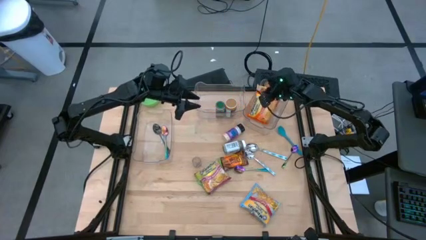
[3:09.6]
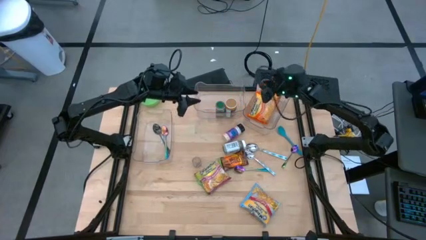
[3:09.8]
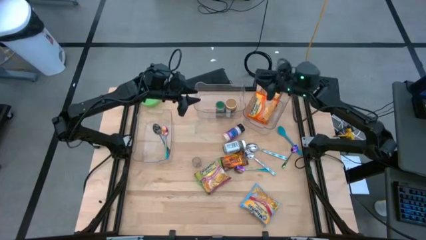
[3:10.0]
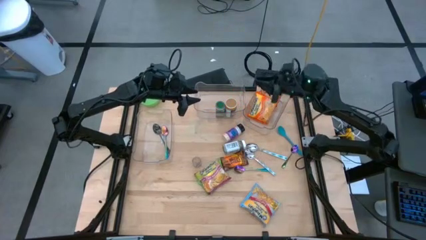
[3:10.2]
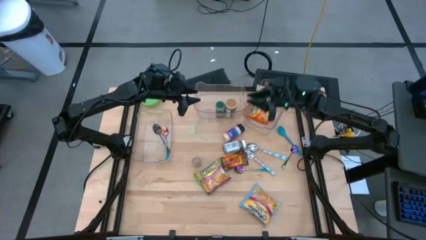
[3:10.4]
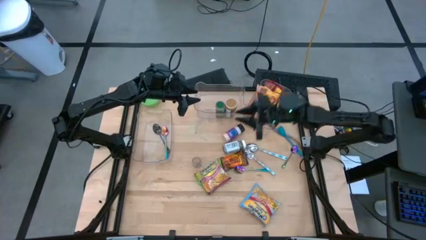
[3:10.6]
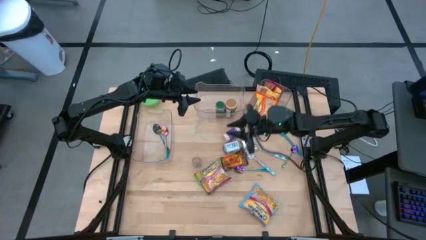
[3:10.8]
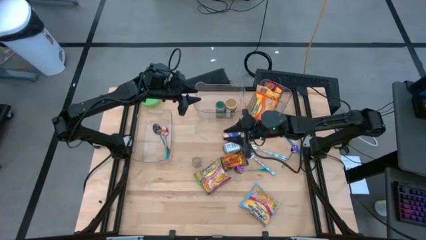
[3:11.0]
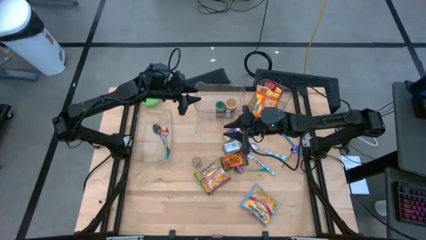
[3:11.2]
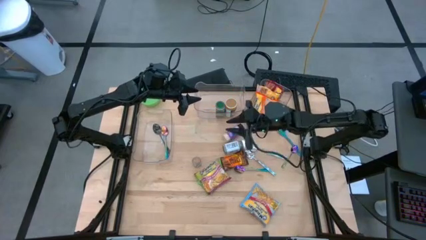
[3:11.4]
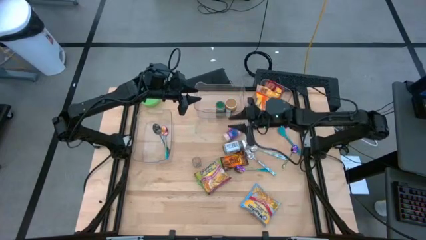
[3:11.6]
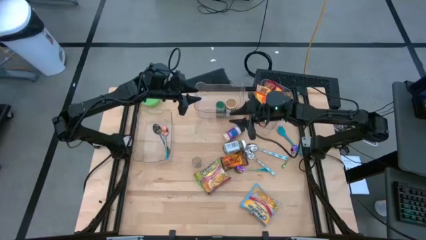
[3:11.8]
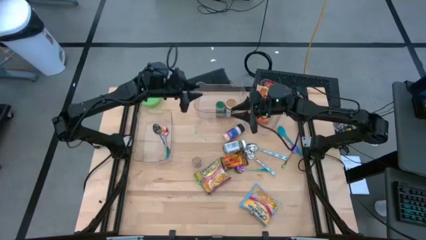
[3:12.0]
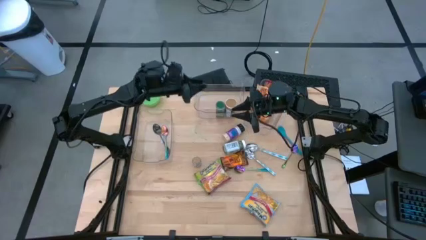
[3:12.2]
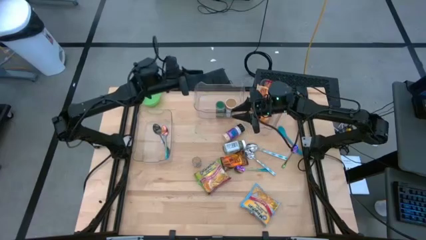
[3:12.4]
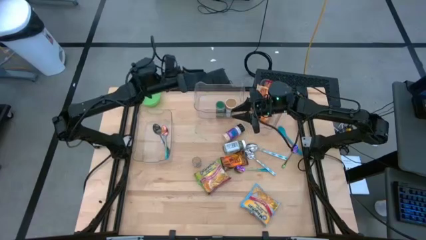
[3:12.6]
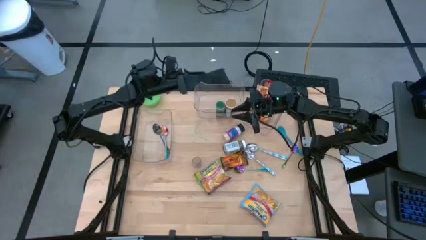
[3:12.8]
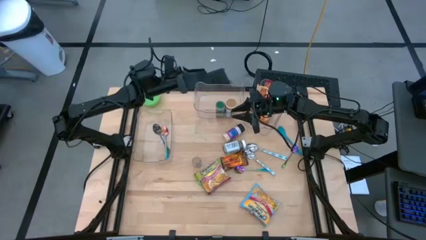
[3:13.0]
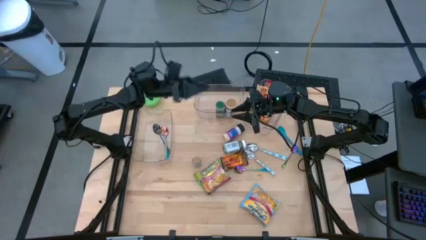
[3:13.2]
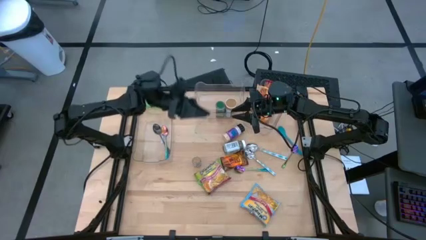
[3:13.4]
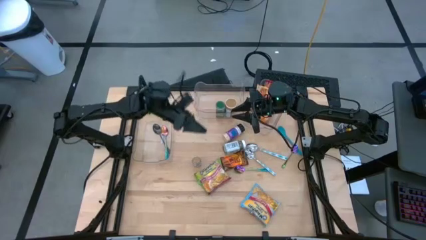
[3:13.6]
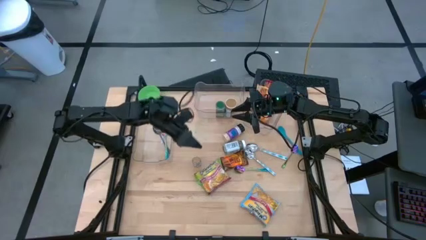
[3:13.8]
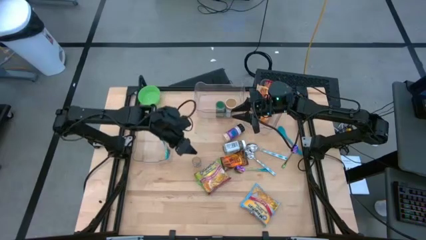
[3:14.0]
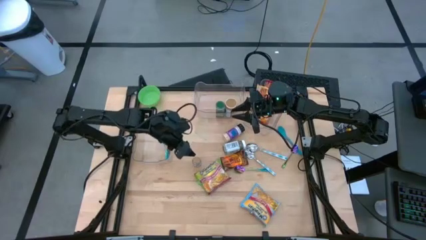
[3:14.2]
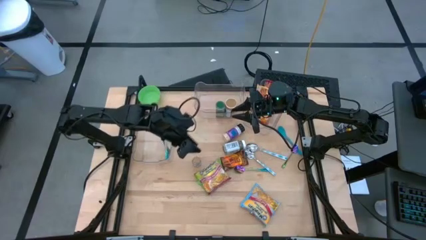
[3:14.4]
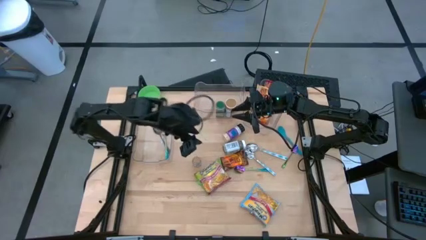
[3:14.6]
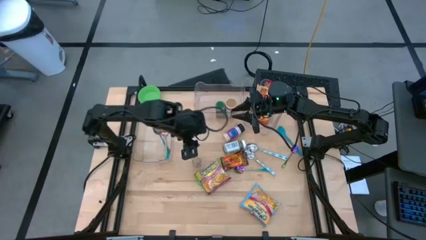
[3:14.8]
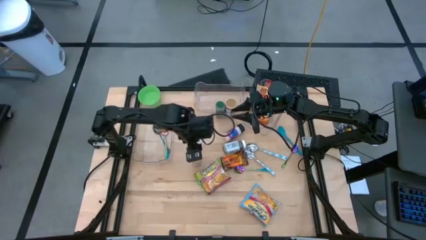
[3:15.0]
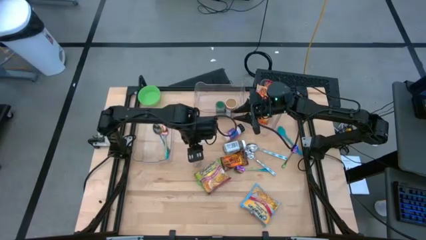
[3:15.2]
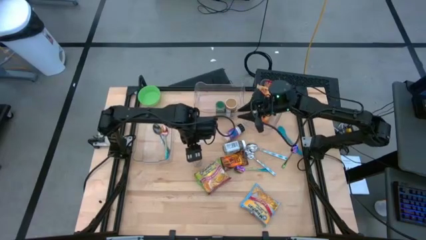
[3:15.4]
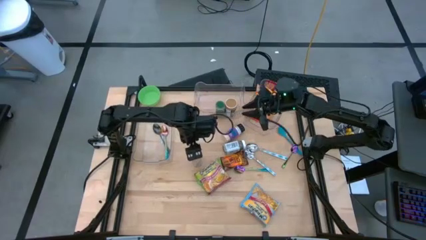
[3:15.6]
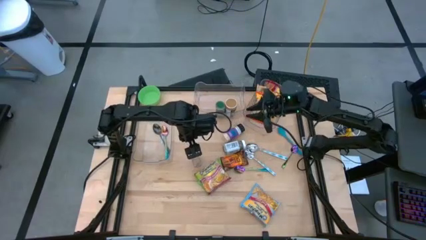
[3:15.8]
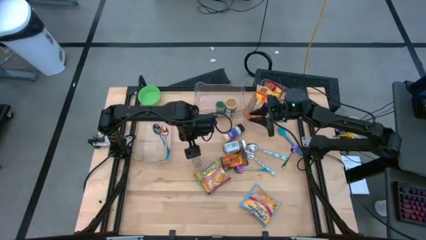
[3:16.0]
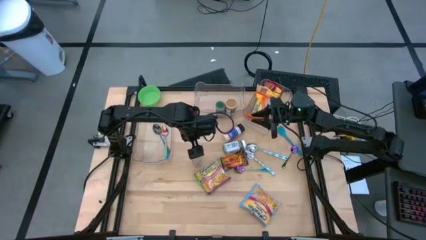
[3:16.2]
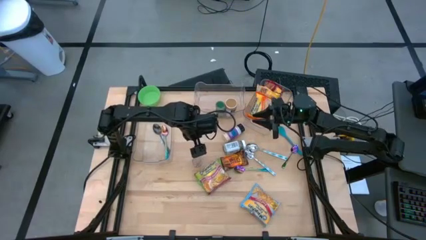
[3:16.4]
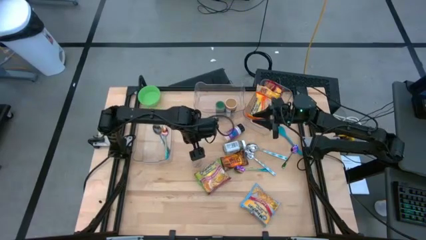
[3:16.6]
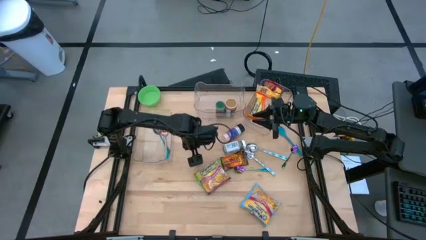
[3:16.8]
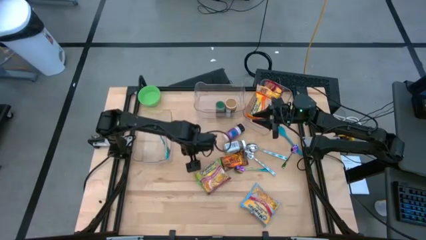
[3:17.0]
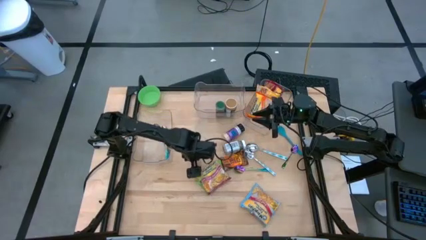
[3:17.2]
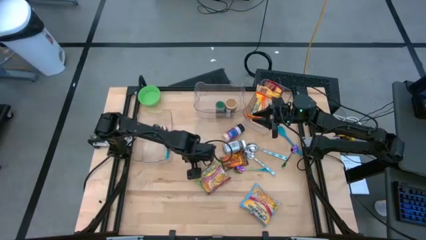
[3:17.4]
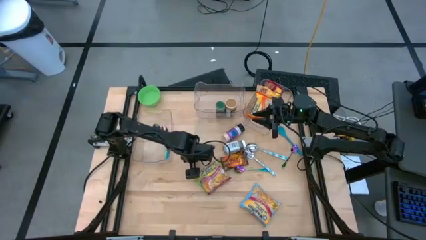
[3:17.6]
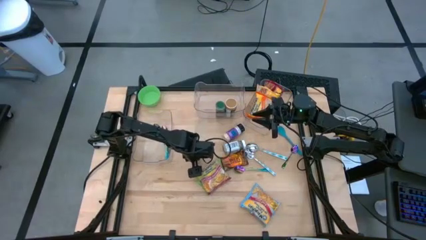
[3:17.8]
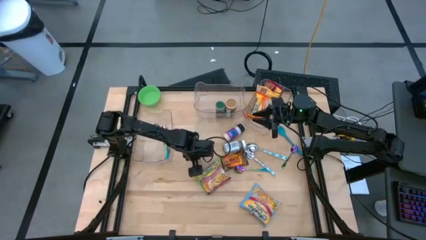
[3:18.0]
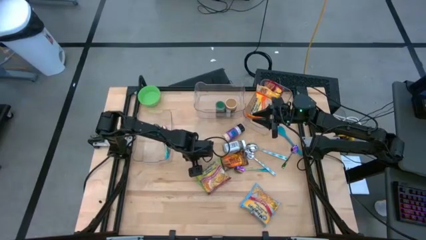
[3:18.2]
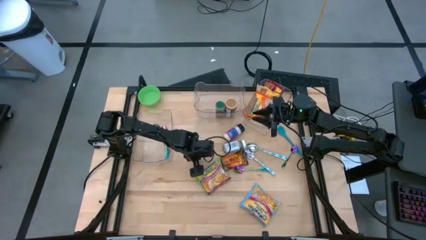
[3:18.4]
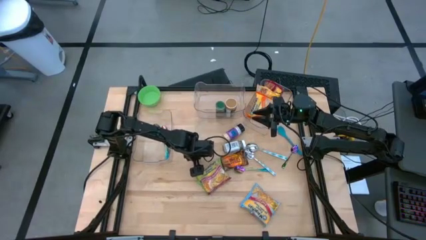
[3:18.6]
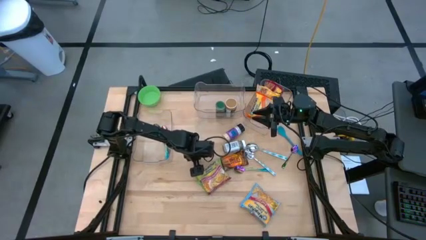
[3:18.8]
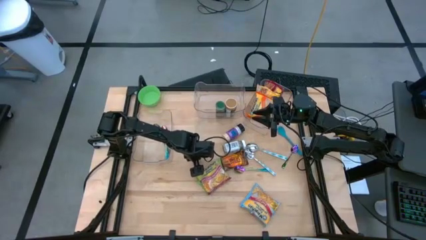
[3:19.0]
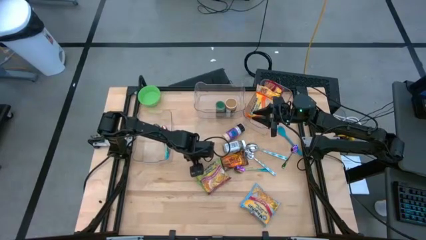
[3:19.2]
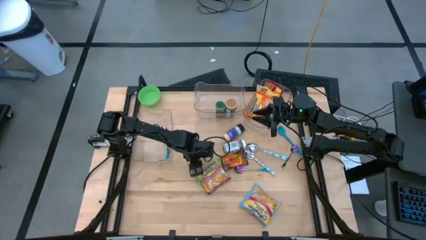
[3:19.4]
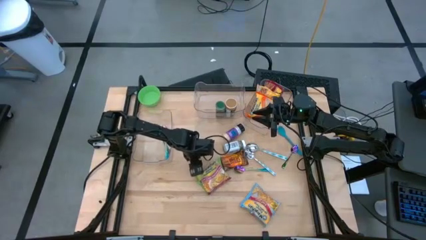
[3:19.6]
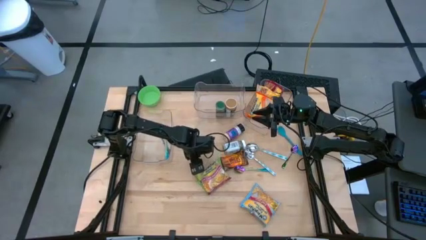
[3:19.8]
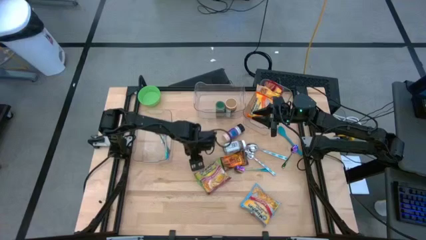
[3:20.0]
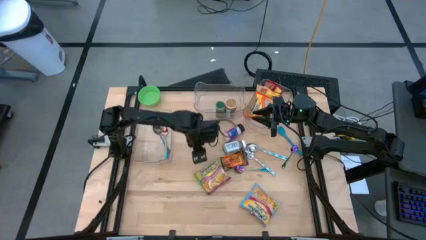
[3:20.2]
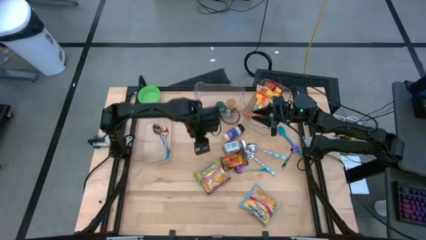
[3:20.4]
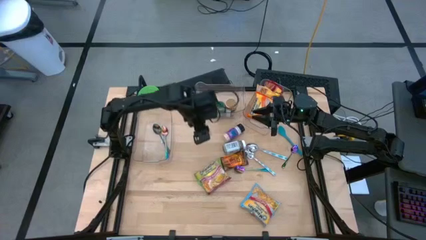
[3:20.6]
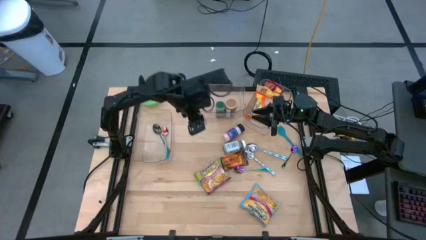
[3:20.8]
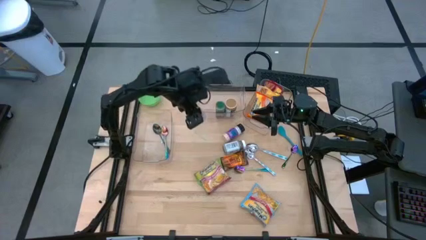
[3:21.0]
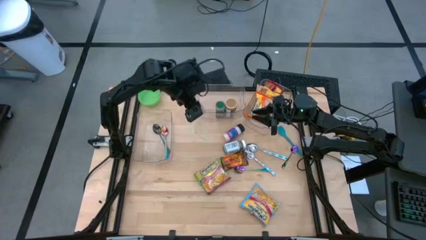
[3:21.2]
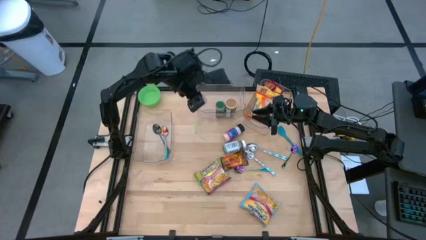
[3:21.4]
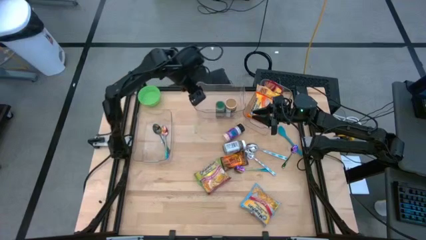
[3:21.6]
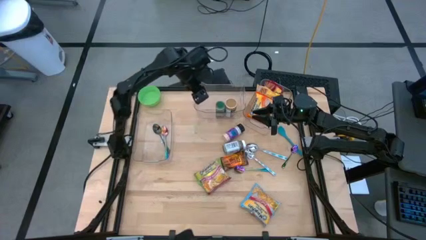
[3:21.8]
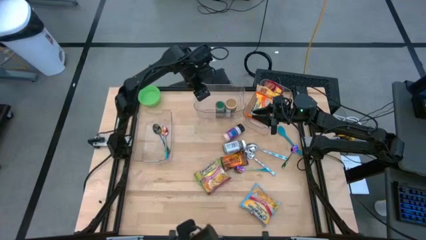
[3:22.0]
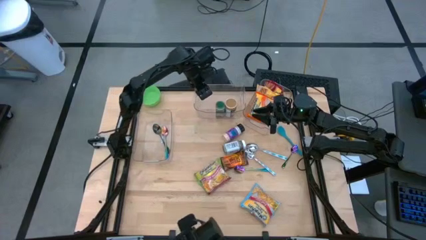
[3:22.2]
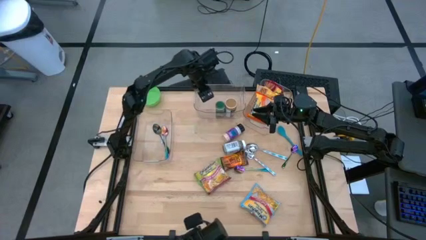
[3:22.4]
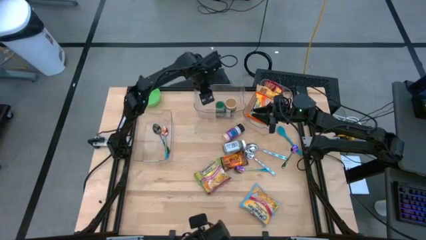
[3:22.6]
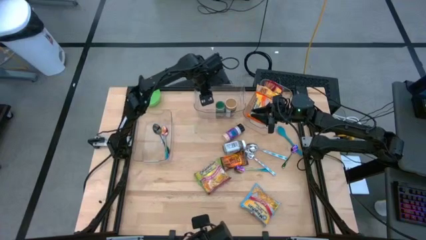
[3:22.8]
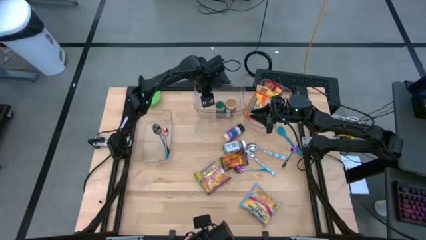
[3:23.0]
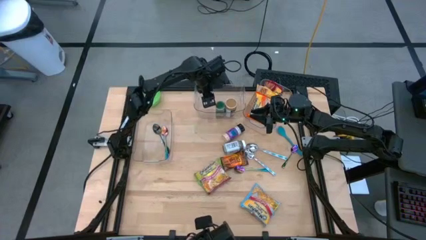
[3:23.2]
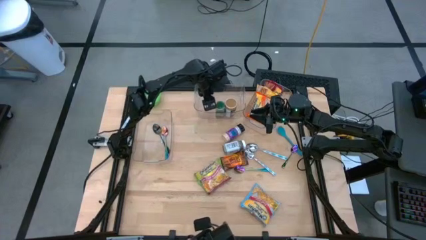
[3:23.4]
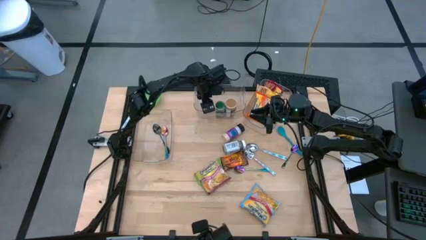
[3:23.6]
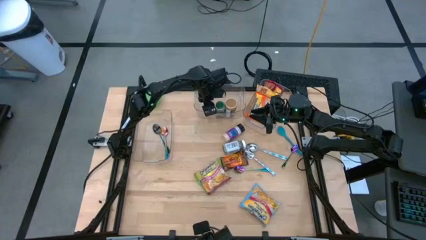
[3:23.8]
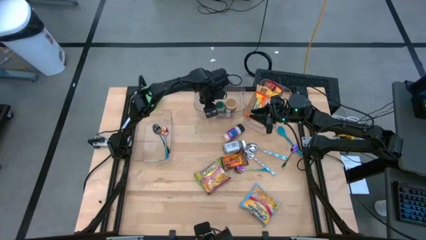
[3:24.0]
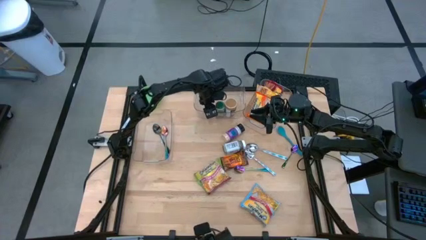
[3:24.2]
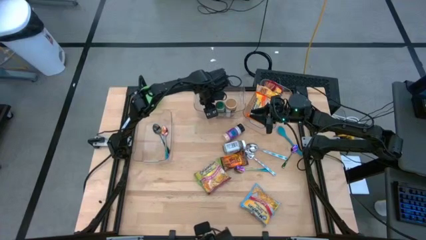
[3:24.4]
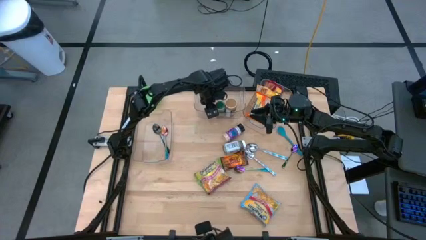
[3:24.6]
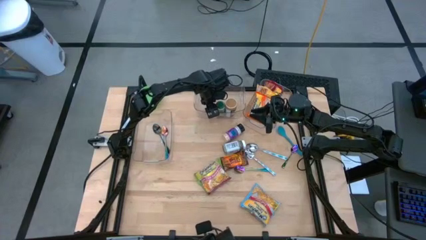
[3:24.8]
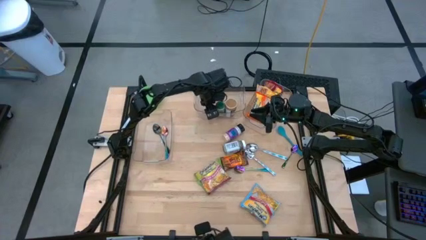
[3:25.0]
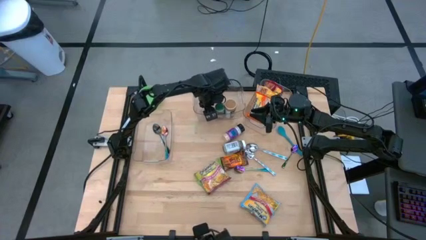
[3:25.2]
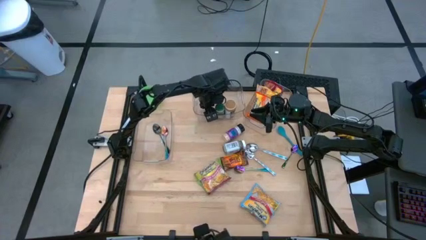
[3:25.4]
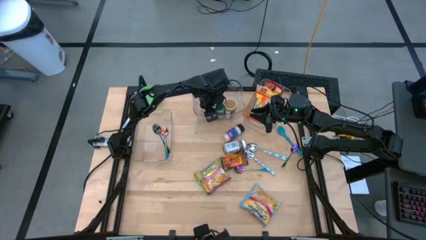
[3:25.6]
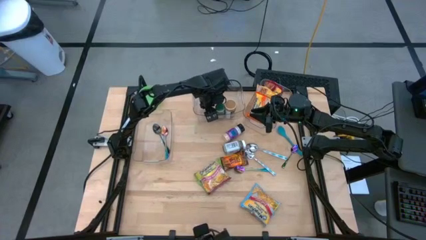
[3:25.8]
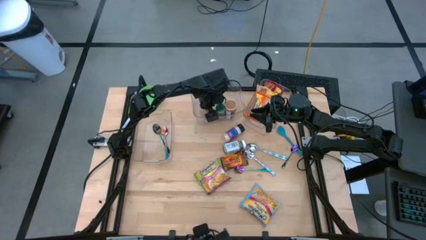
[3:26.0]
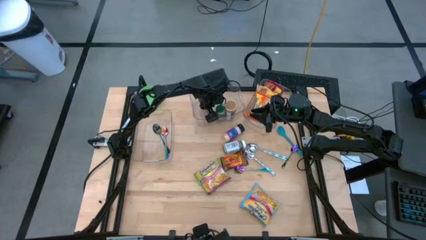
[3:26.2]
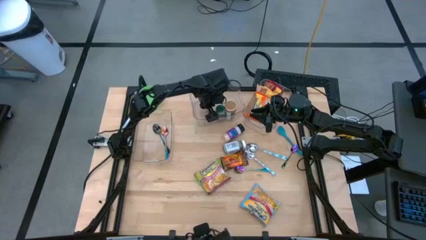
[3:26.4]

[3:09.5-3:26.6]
Task: Pick & Place Food Item
Put the brown spice bottle into the middle transparent bin
